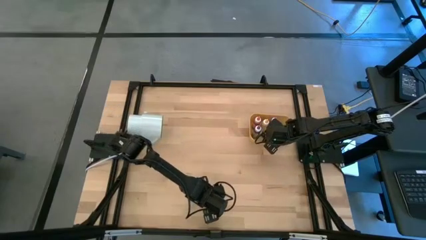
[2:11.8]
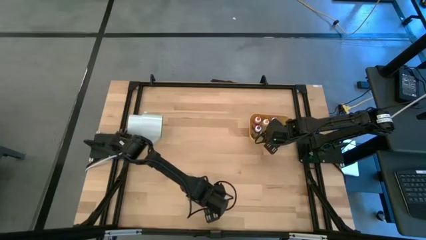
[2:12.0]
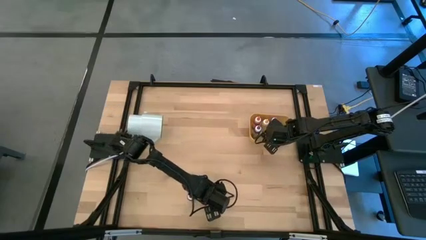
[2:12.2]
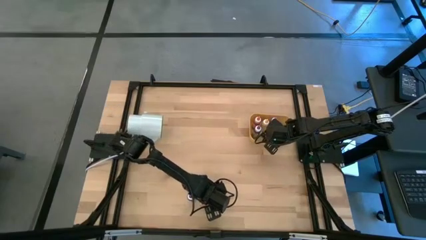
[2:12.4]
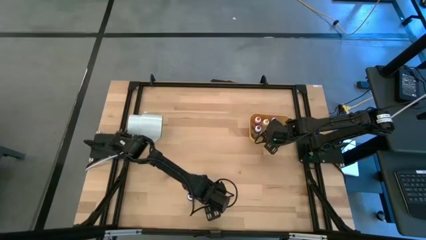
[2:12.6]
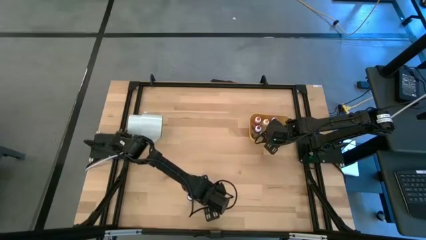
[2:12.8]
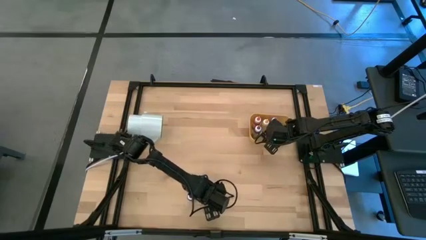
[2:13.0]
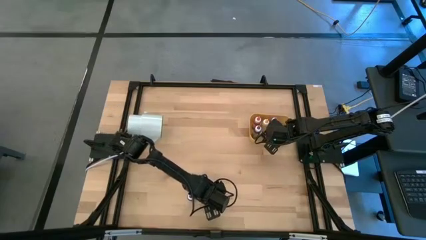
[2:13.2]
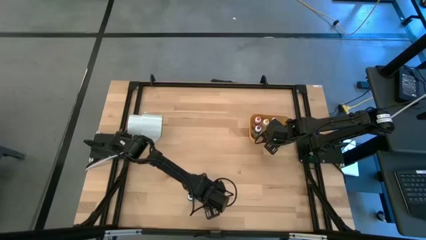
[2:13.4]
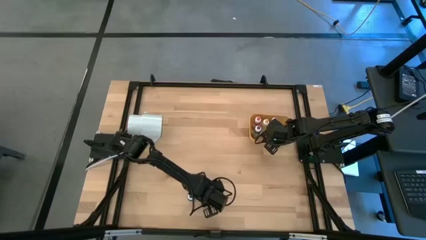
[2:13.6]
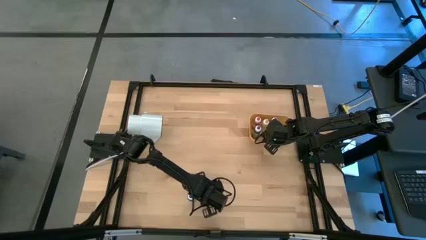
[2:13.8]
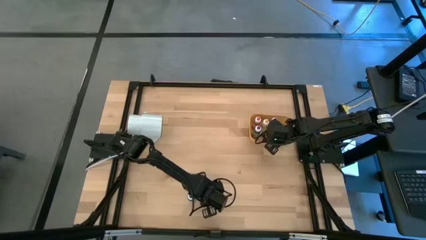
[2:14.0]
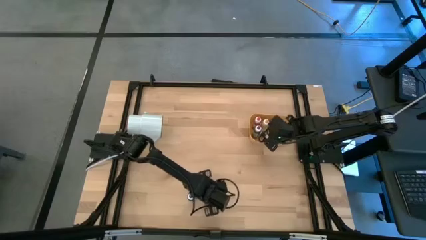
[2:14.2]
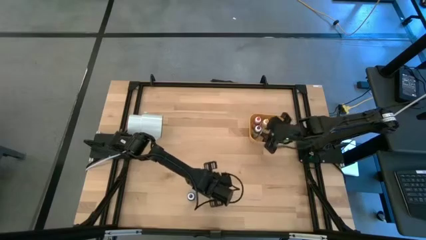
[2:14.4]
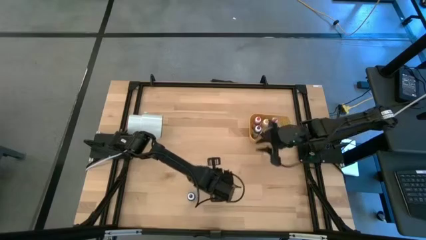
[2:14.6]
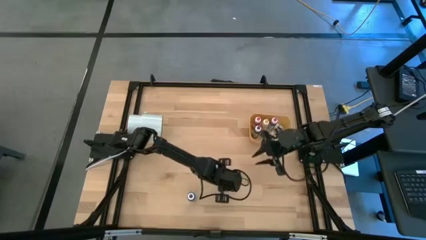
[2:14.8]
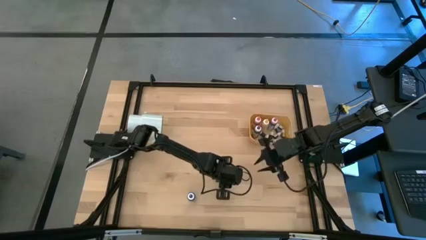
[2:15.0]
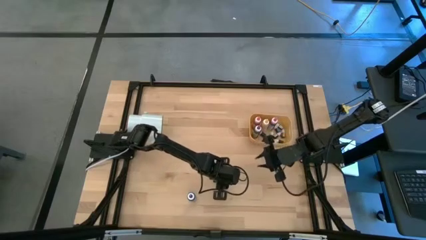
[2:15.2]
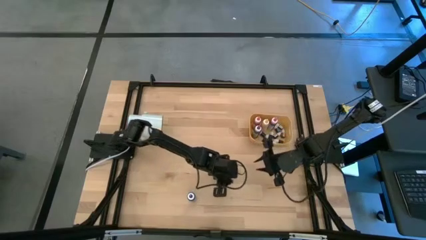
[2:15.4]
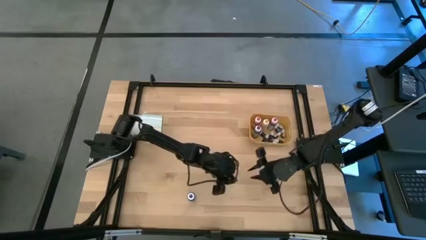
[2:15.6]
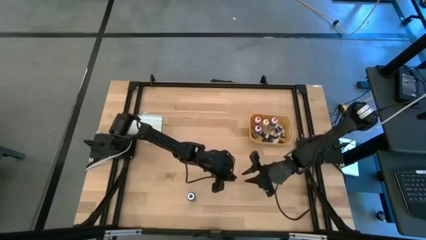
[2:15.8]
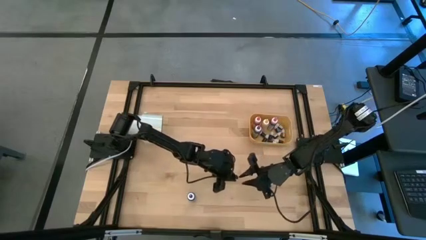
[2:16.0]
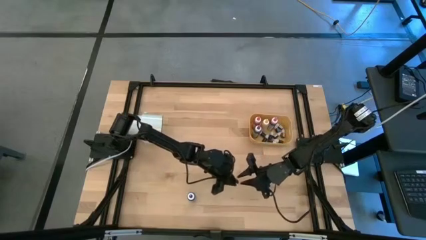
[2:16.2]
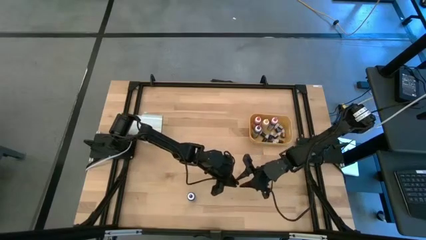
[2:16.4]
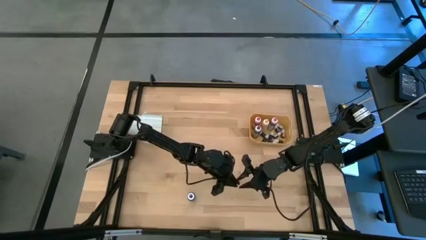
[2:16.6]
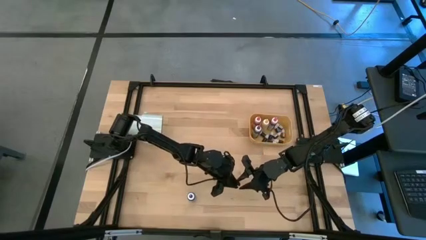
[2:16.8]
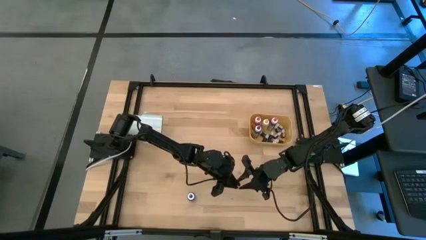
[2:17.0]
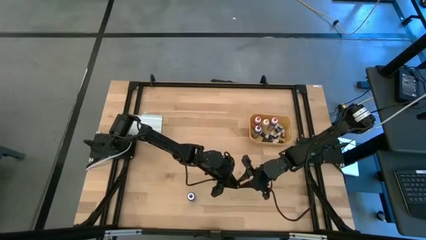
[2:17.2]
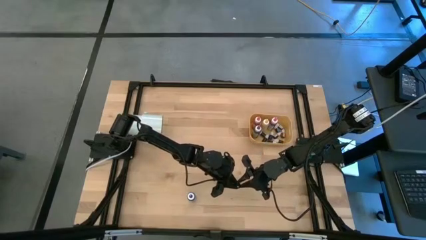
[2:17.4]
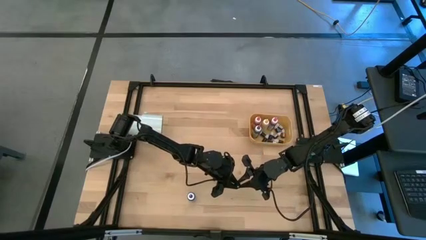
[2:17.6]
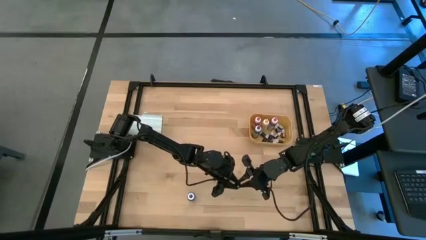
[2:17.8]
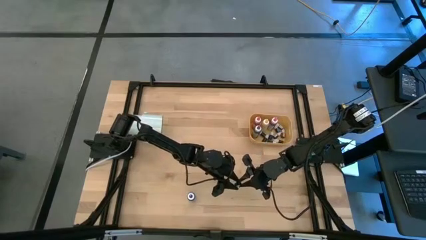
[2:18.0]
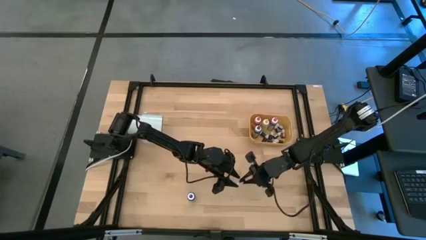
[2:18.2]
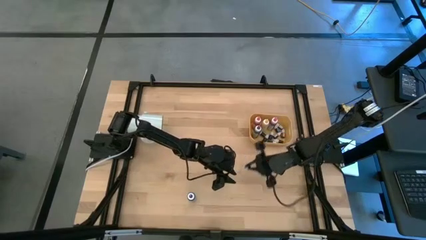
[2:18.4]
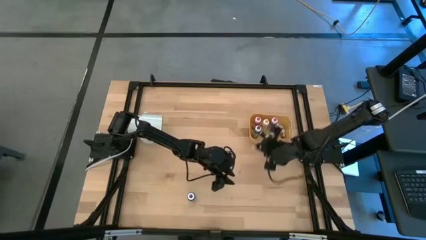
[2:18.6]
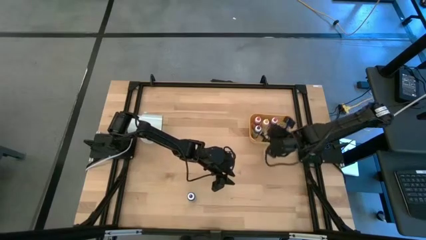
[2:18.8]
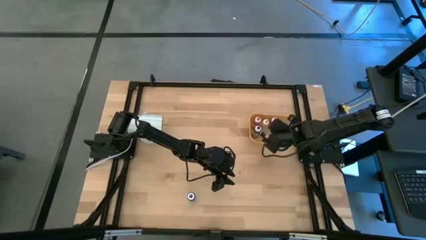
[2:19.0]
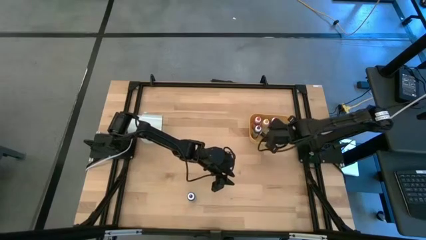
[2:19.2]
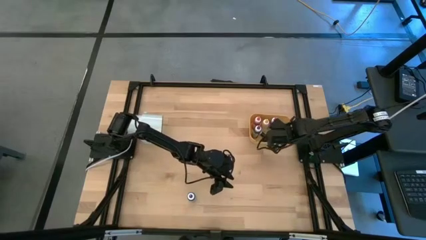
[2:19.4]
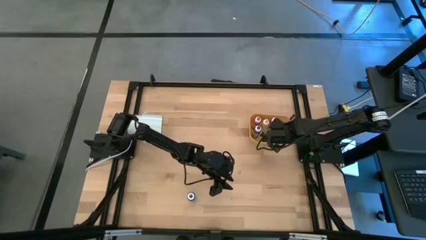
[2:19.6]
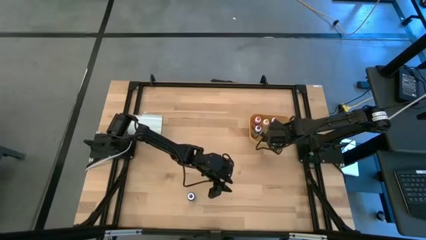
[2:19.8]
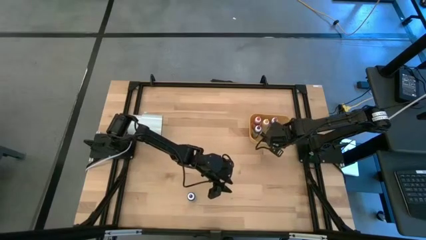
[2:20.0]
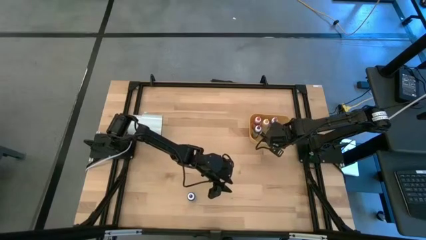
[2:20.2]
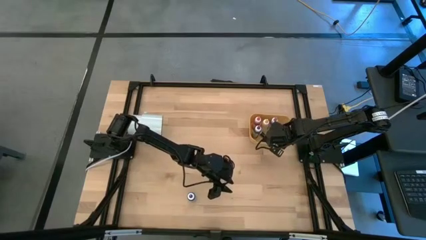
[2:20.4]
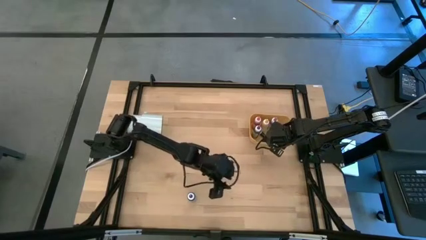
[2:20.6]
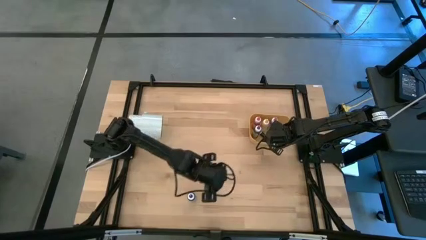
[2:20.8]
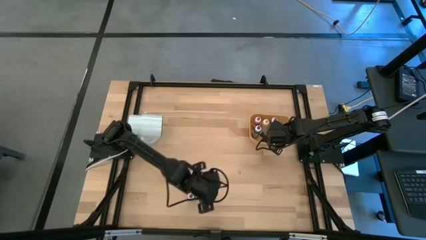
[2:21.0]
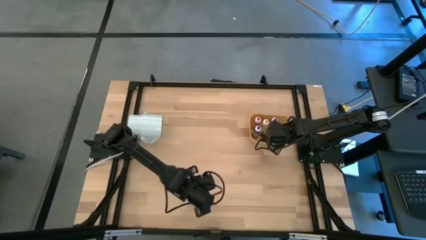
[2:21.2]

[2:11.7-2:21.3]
Task: Pick & Place food coloring
Put the green food coloring bottle into the yellow bin

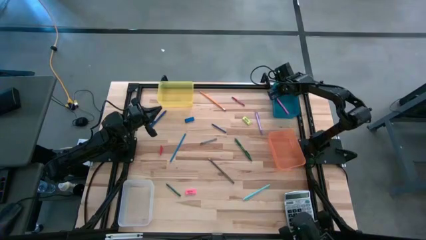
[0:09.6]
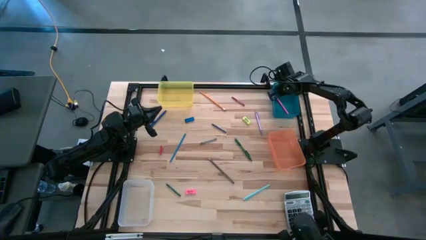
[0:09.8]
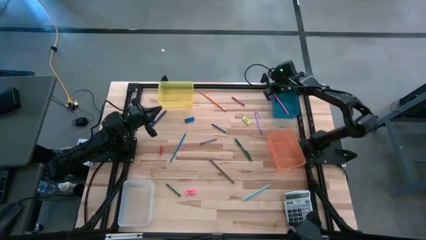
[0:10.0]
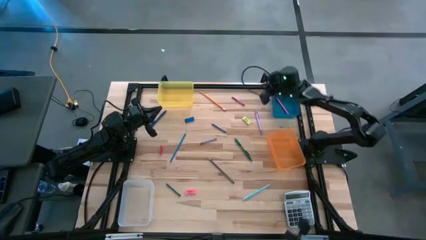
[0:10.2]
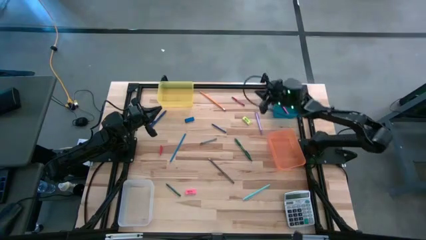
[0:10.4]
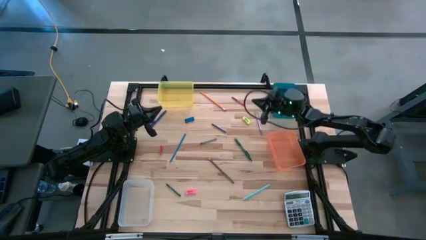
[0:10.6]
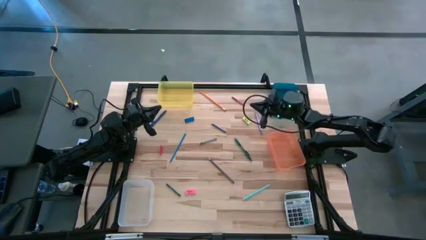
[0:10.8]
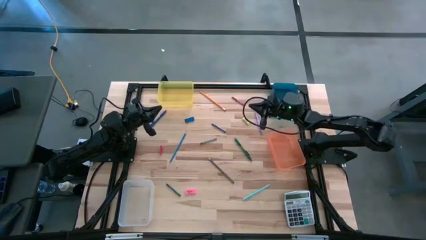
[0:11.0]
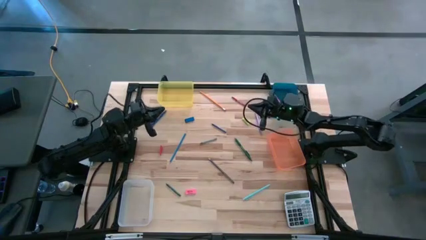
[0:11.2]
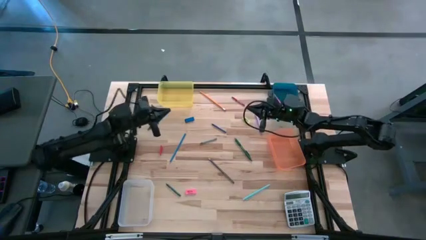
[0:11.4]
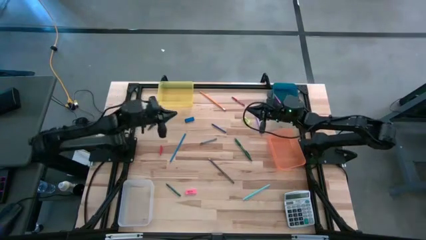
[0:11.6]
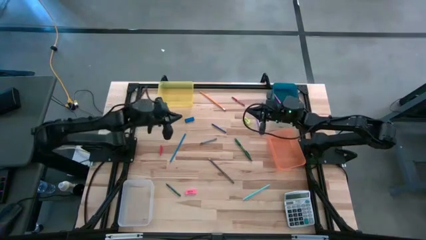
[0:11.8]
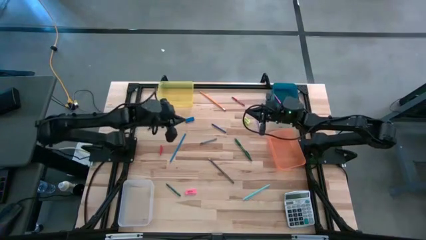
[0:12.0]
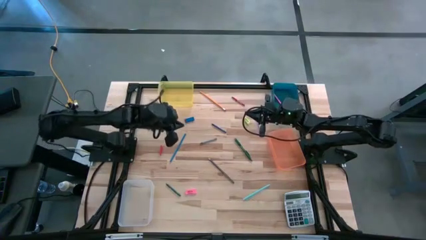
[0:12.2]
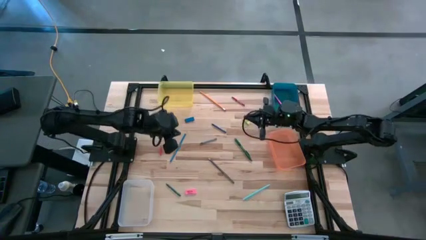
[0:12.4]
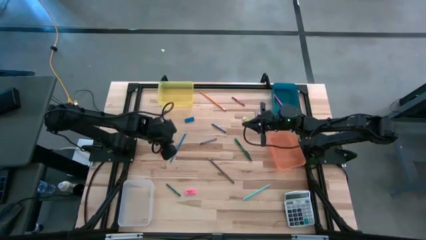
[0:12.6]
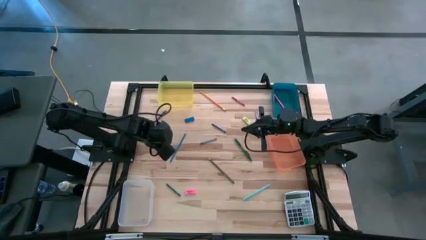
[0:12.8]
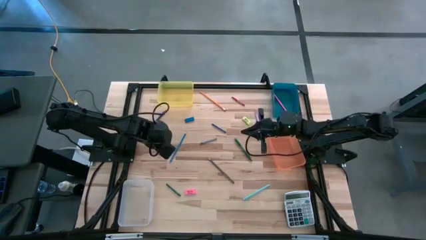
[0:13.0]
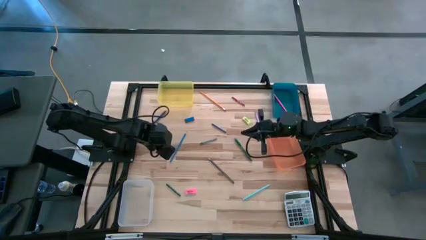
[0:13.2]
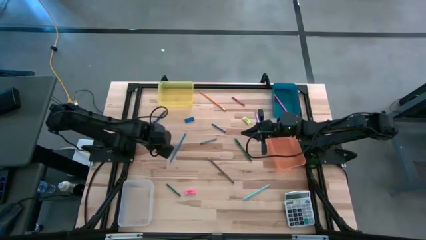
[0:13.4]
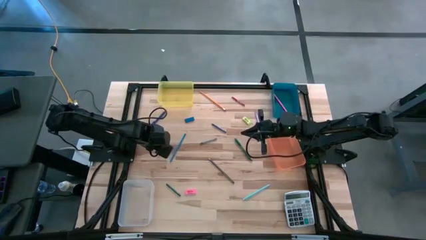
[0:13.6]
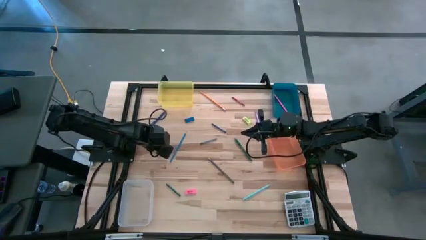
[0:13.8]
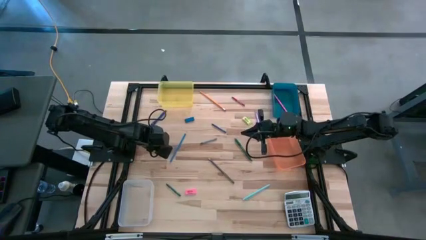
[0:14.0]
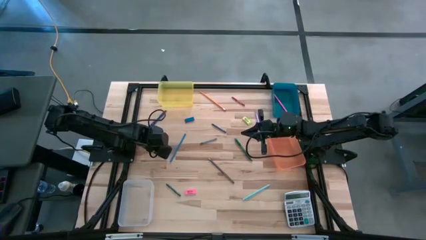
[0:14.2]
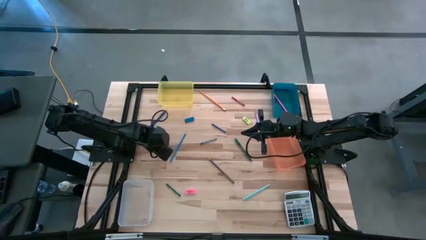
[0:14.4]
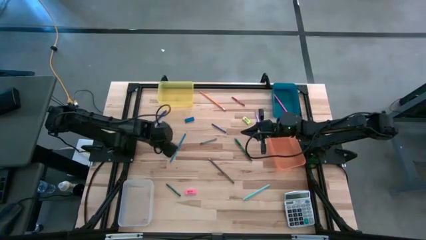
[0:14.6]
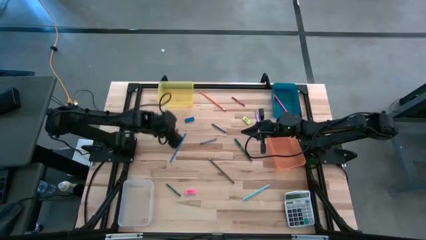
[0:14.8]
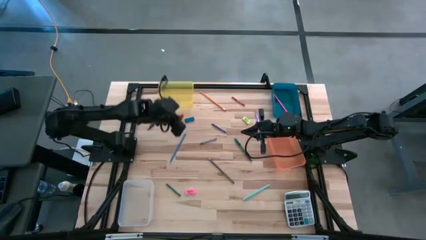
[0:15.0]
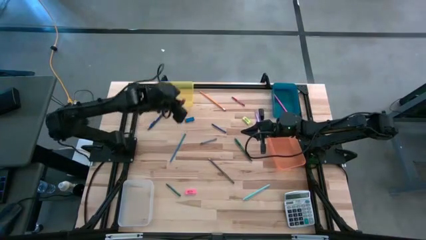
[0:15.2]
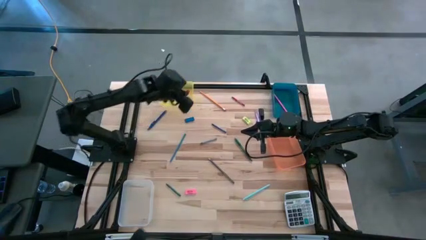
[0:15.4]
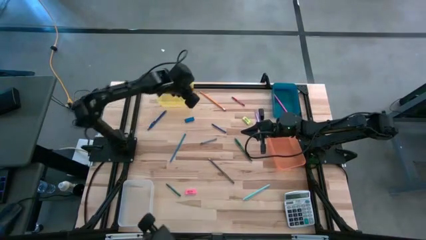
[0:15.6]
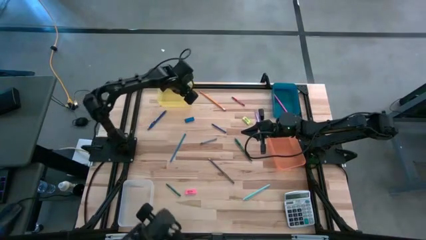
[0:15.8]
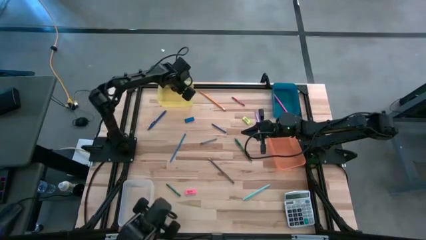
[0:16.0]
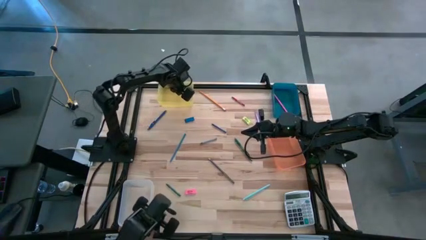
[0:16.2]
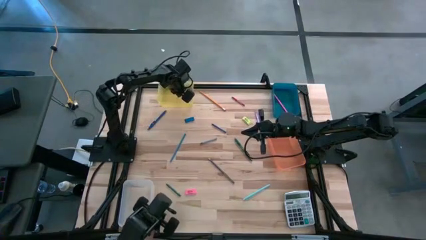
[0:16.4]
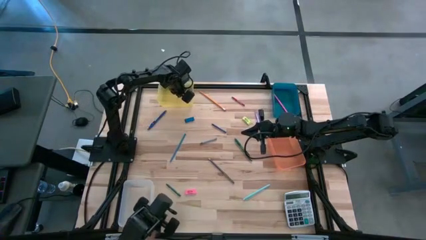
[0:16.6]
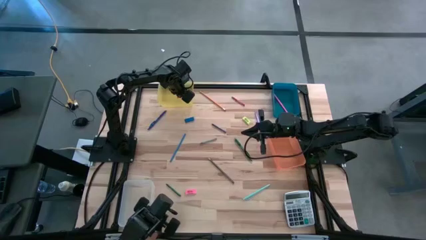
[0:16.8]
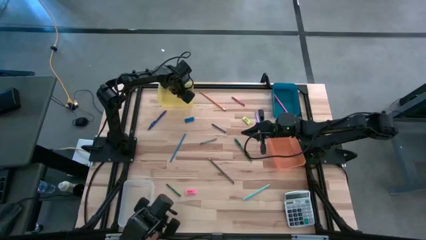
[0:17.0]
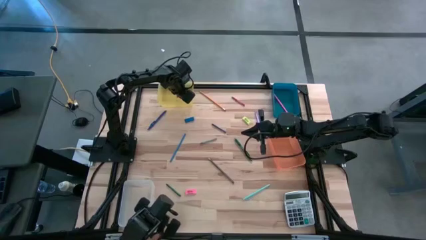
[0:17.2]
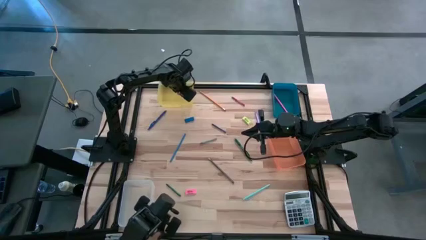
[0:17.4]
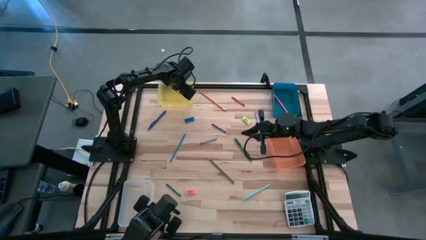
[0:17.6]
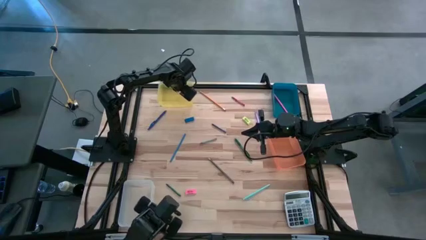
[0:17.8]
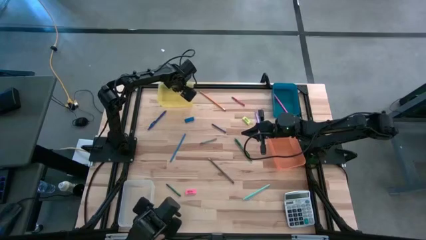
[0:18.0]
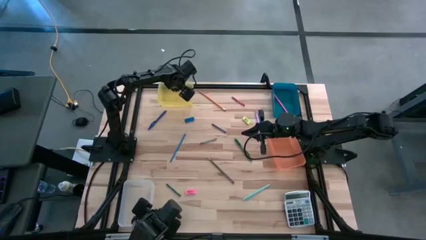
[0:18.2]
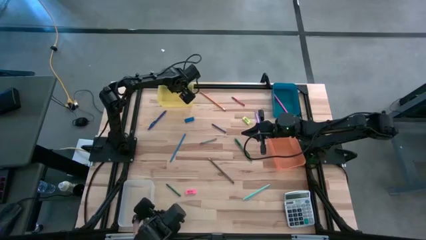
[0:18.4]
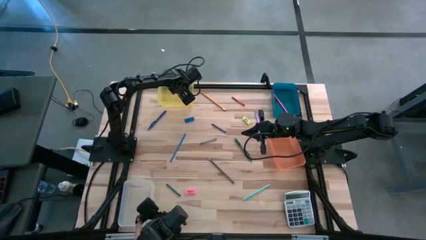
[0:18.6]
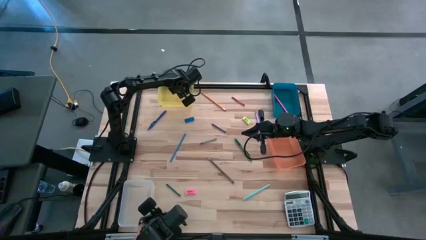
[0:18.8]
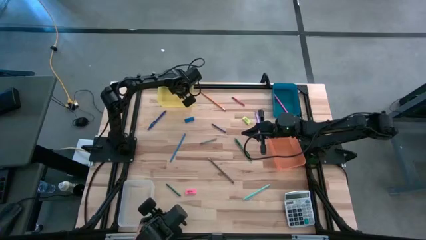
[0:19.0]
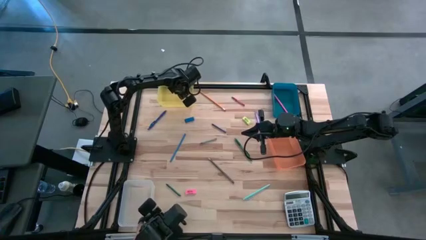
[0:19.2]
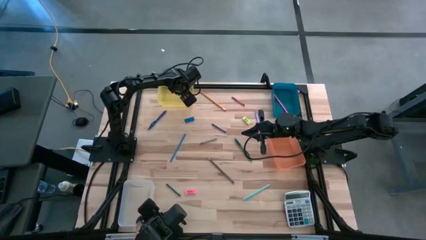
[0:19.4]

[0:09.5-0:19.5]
Task: Sort crayons/erasers/pens/pencils in bins
Put the red eraser into the yellow bin
